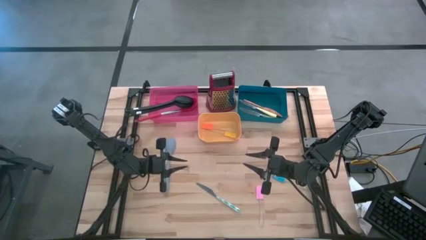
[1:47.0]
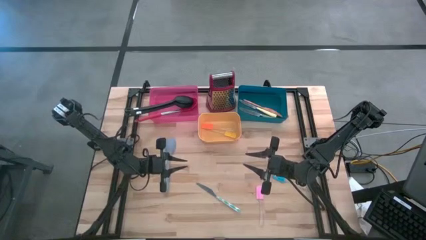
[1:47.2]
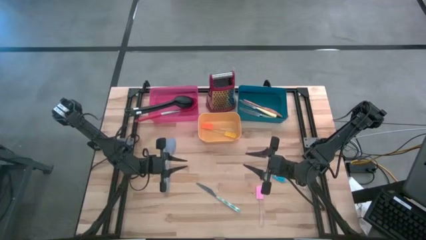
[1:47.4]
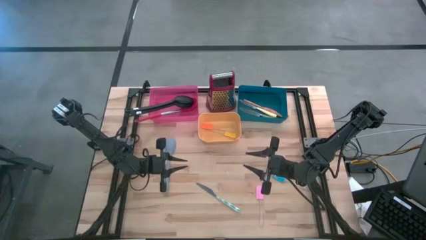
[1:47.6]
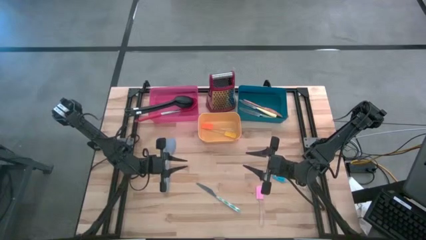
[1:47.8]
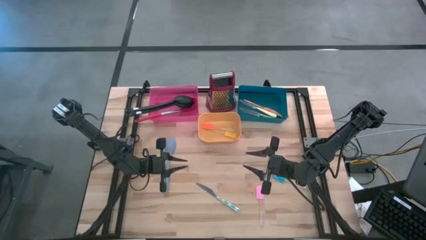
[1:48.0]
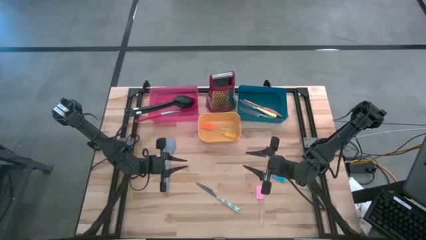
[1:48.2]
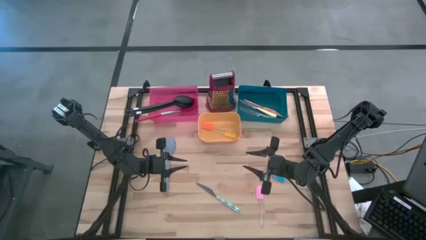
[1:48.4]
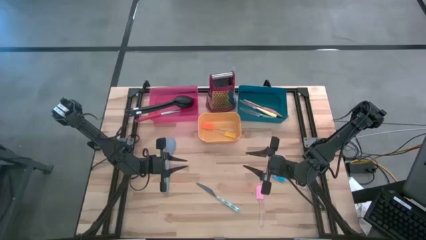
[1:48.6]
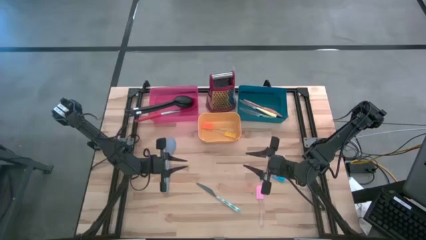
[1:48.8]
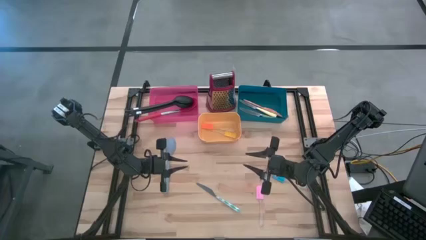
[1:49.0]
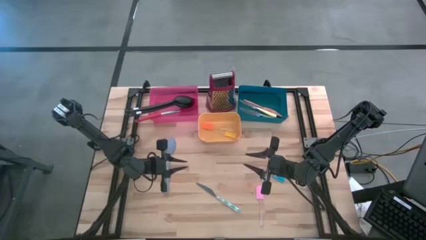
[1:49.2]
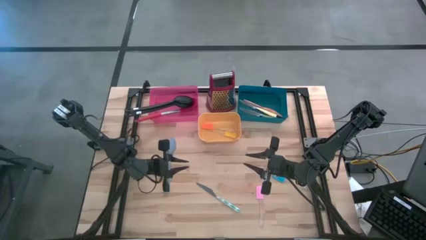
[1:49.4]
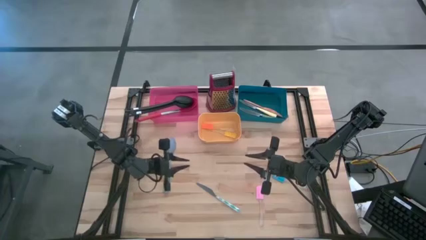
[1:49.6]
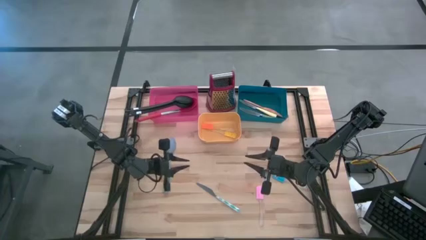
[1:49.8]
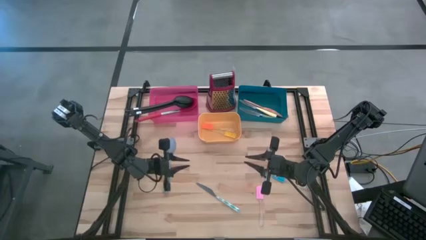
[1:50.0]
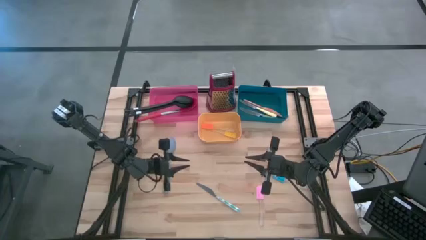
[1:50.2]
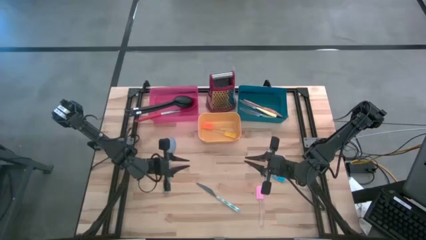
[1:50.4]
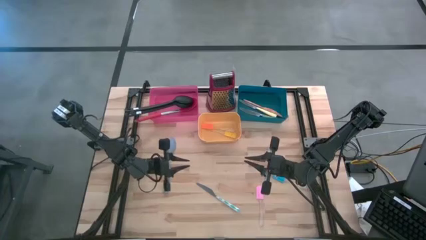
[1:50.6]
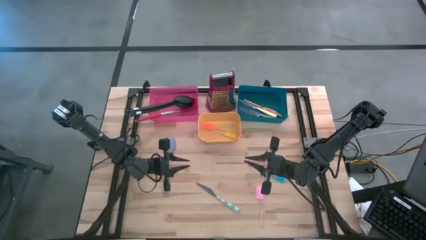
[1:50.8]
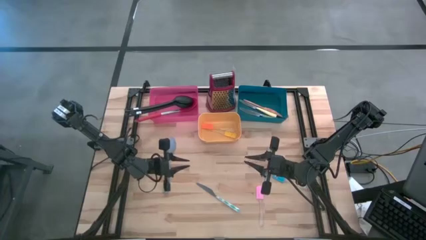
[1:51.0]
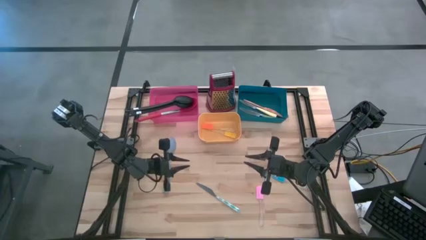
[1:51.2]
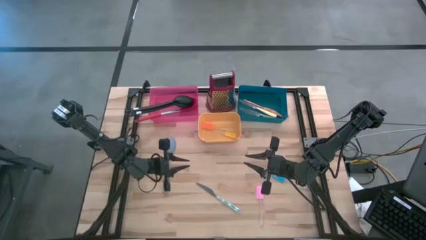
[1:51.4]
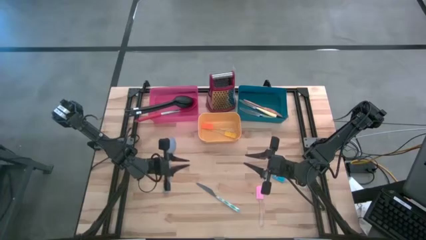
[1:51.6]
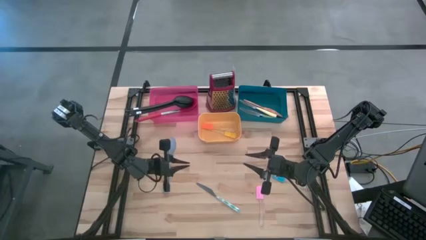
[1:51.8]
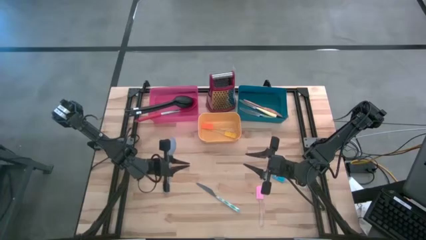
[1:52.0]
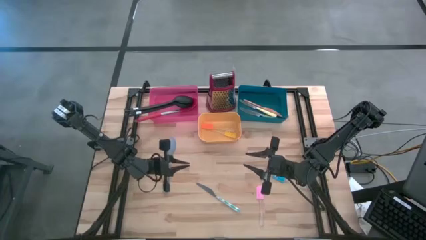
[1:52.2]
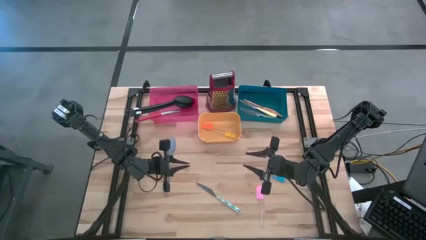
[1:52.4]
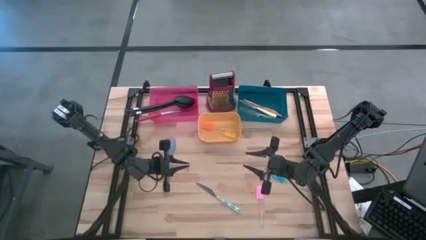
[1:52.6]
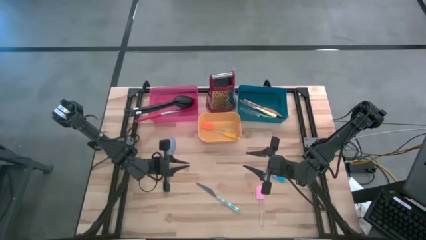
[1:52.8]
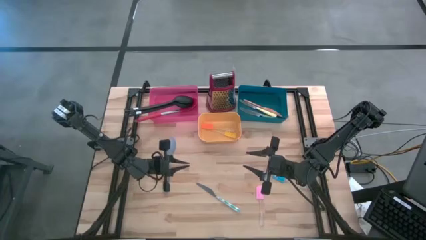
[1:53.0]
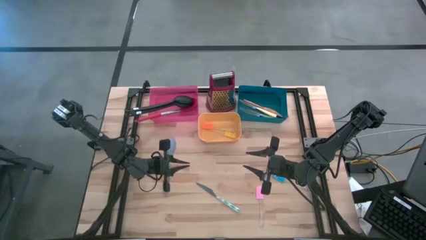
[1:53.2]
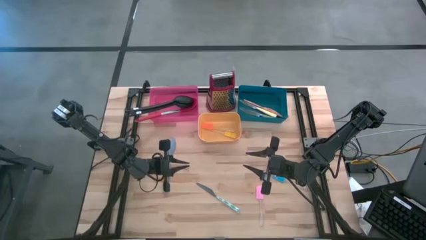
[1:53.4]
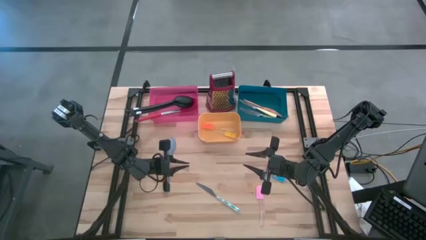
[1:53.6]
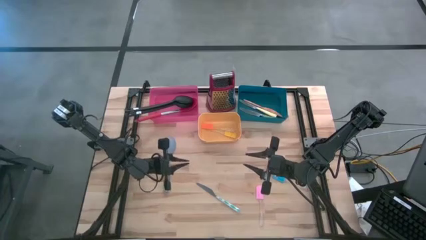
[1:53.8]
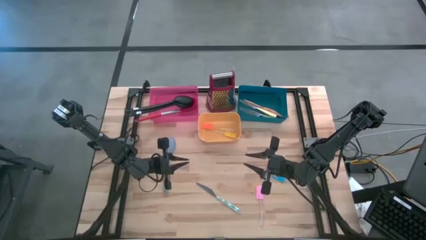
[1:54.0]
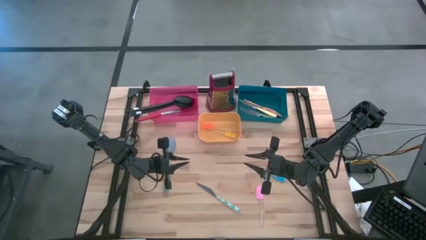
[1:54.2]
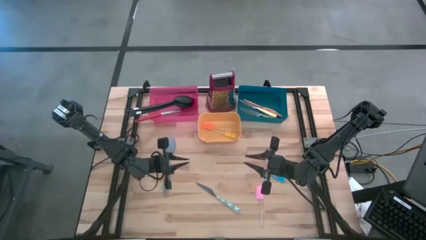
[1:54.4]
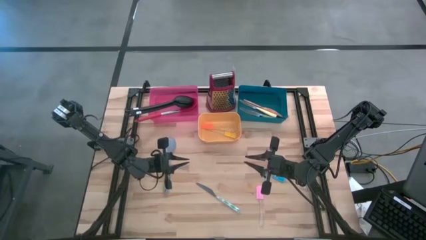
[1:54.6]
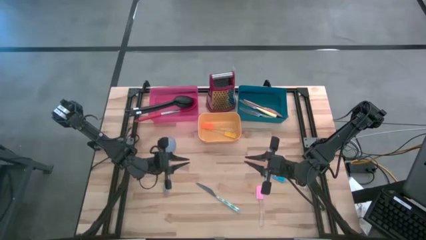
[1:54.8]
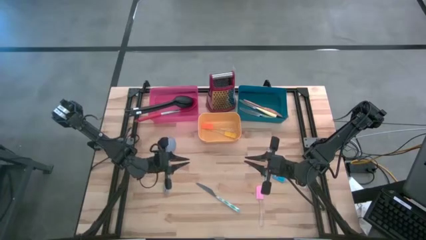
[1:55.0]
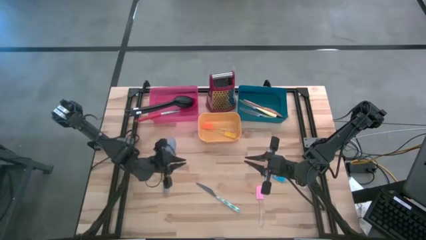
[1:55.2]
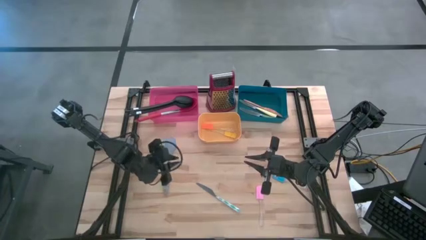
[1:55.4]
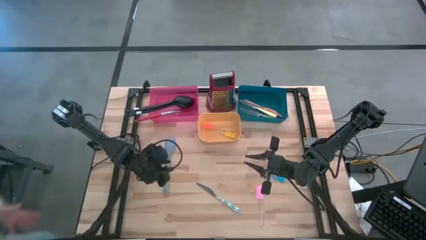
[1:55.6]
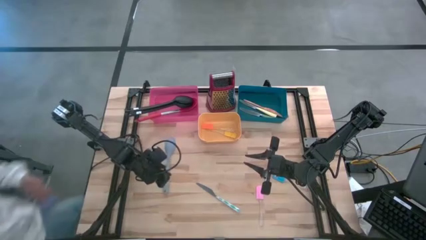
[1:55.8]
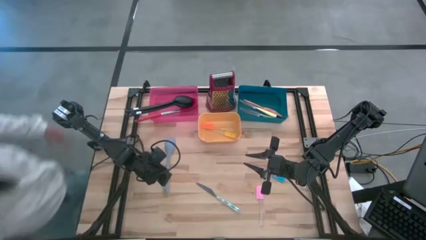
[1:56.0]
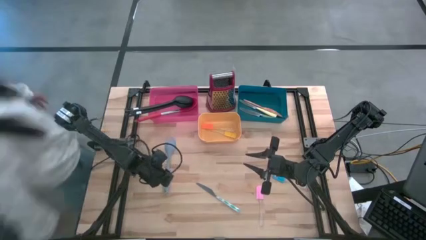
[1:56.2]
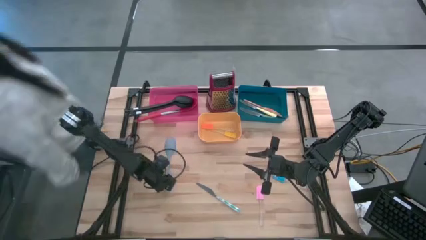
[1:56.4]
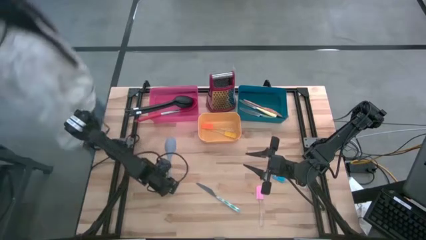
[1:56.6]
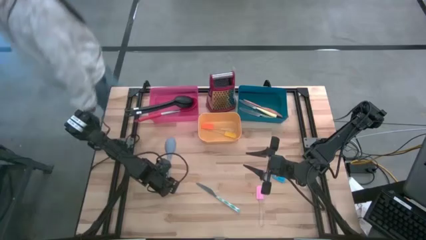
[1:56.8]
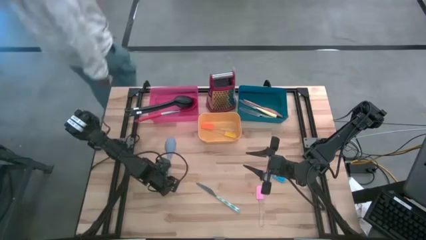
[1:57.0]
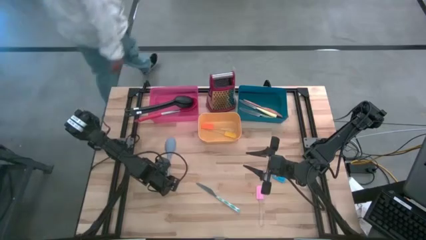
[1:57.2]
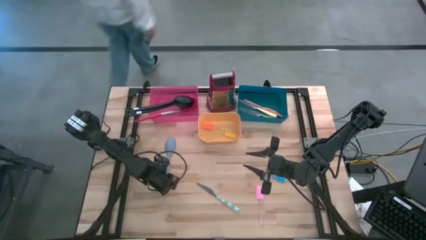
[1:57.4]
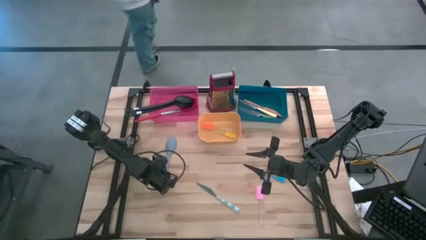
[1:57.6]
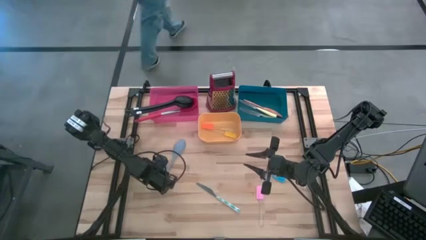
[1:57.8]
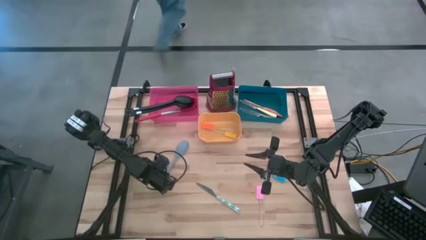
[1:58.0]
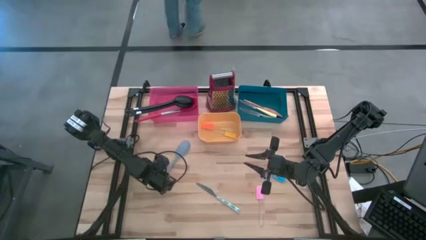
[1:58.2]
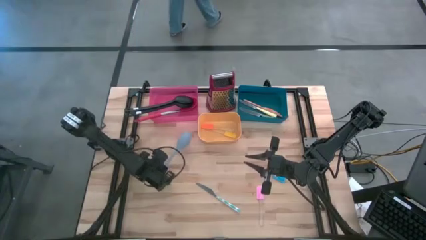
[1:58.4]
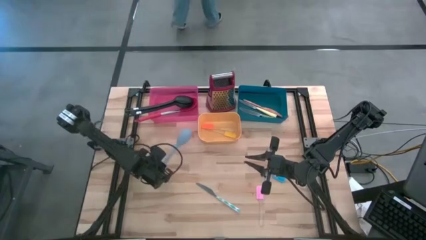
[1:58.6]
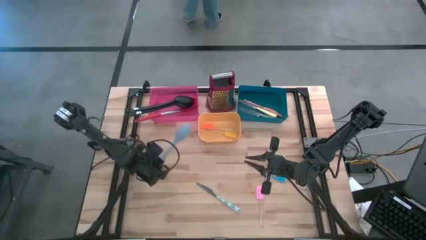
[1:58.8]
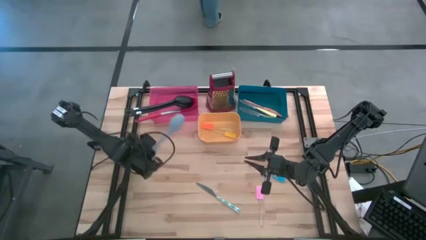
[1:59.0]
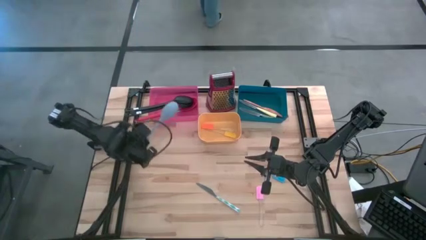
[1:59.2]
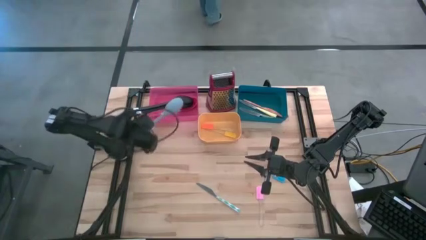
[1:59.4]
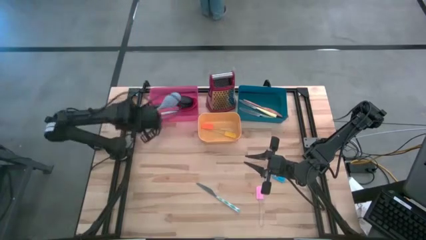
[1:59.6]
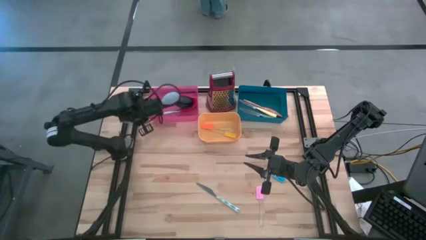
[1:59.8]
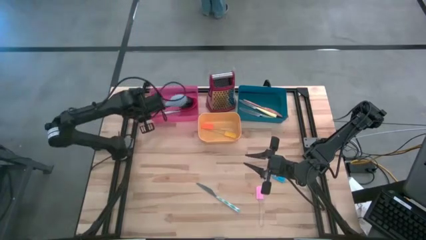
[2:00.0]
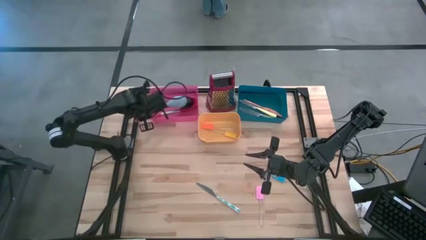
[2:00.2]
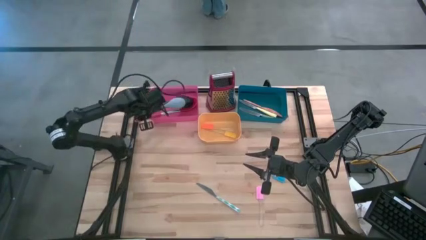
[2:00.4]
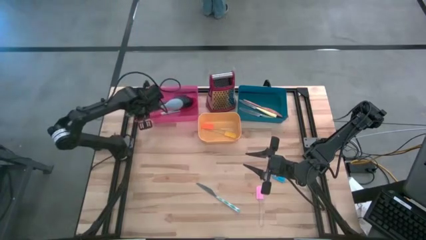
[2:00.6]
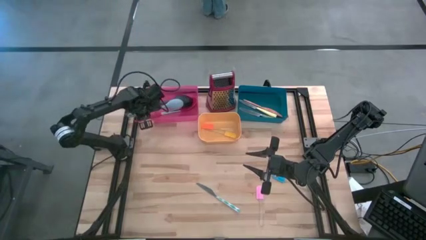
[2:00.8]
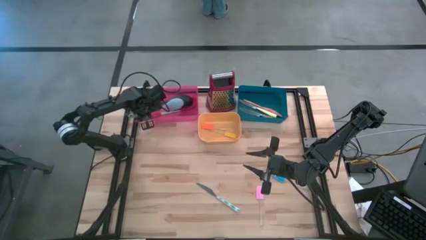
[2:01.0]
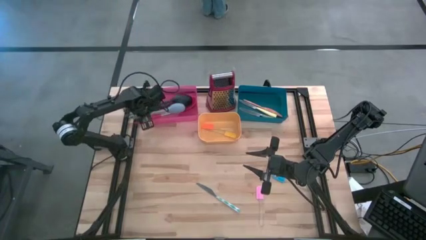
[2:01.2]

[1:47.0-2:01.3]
Task: Pick & Place Kitchen Items
Put the light blue serving spoon into the red bin
